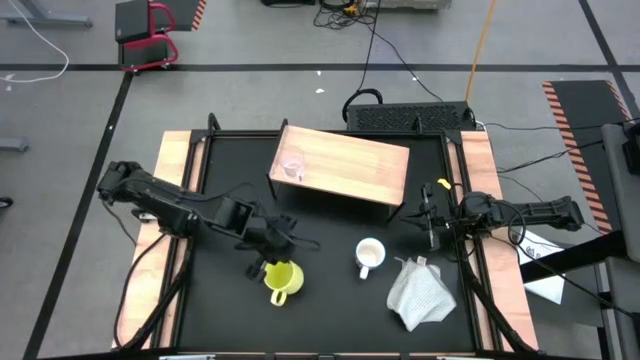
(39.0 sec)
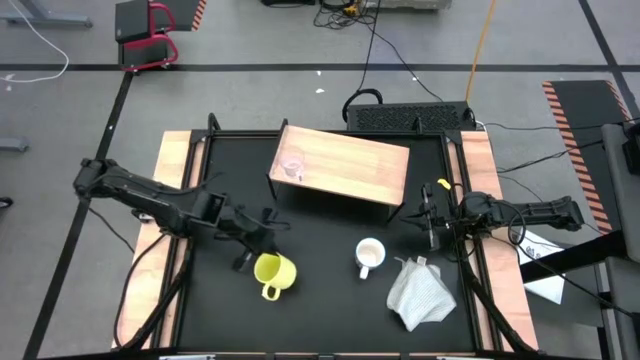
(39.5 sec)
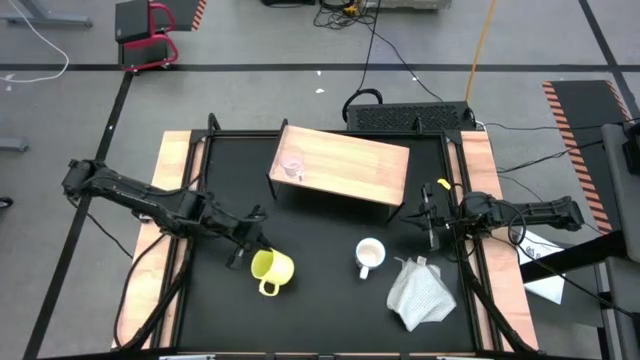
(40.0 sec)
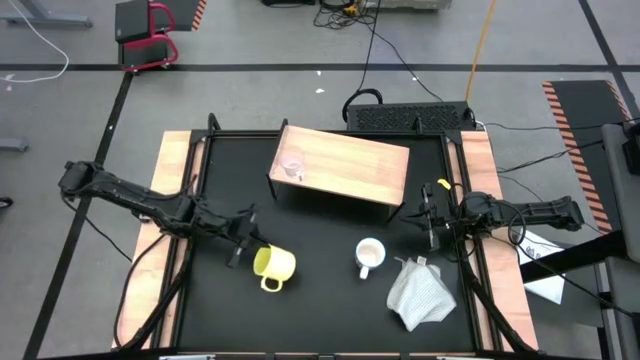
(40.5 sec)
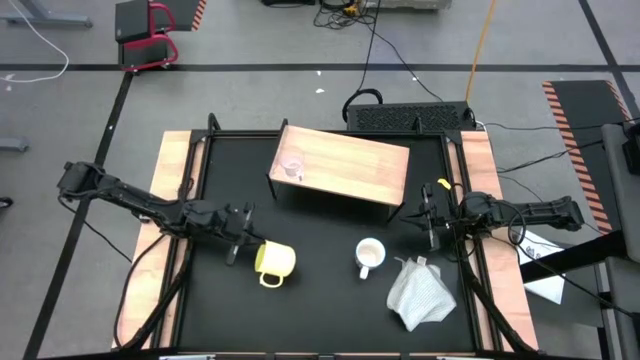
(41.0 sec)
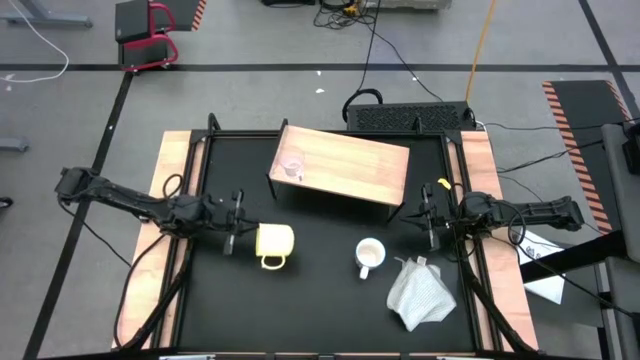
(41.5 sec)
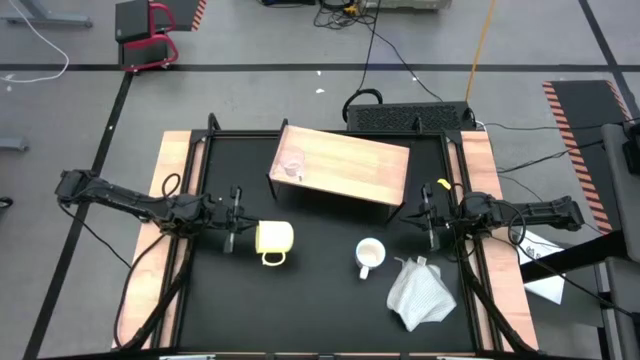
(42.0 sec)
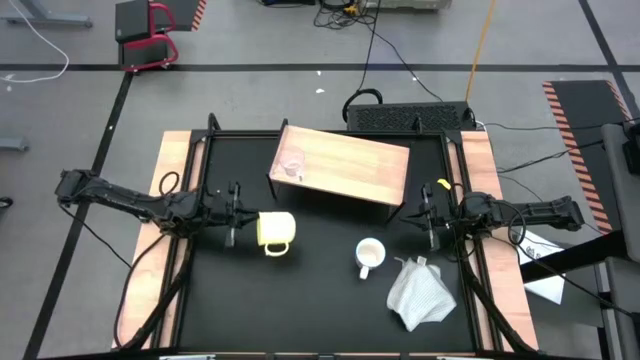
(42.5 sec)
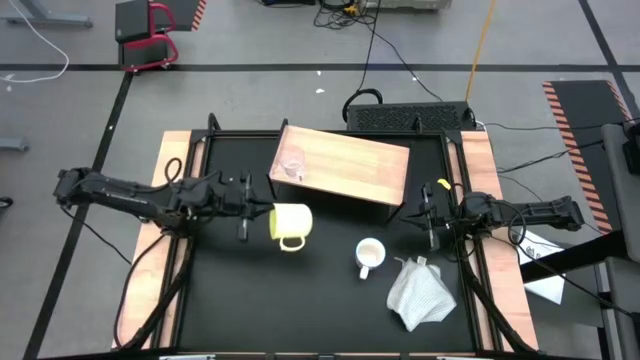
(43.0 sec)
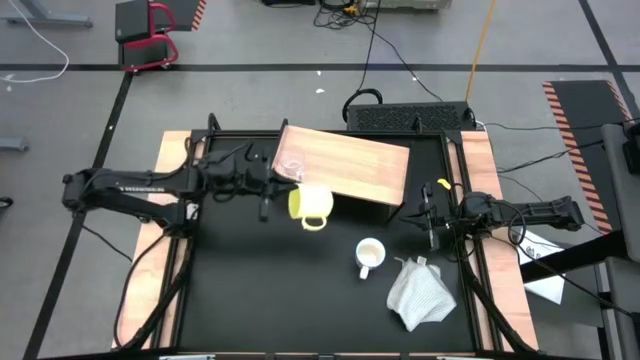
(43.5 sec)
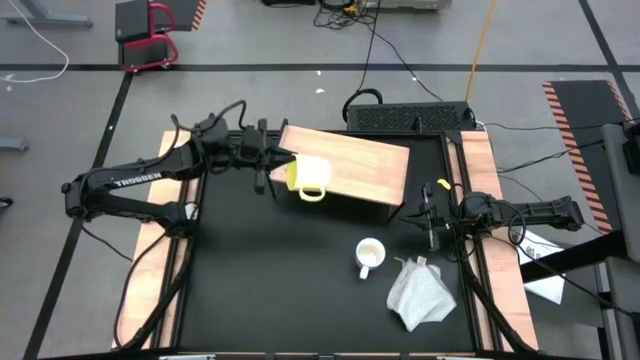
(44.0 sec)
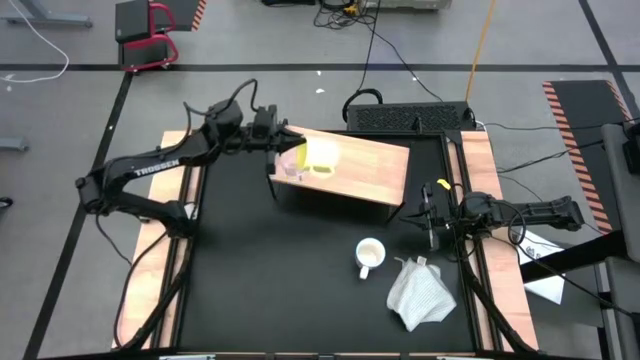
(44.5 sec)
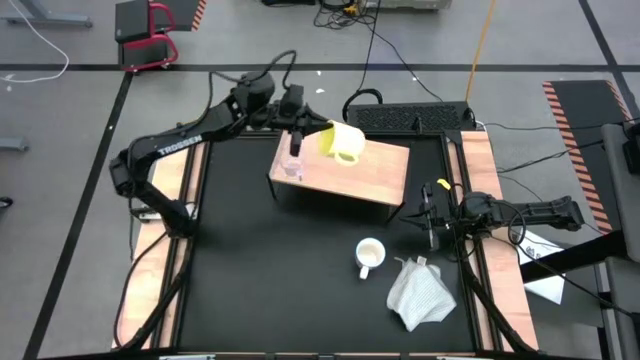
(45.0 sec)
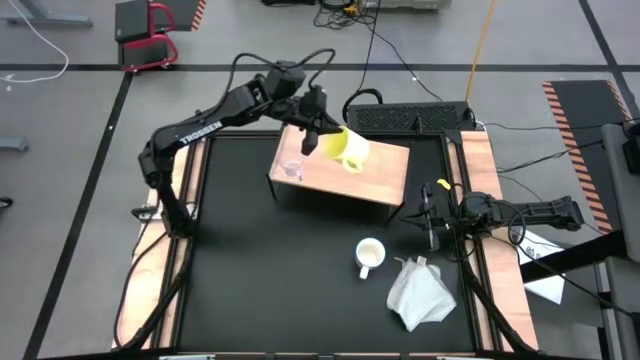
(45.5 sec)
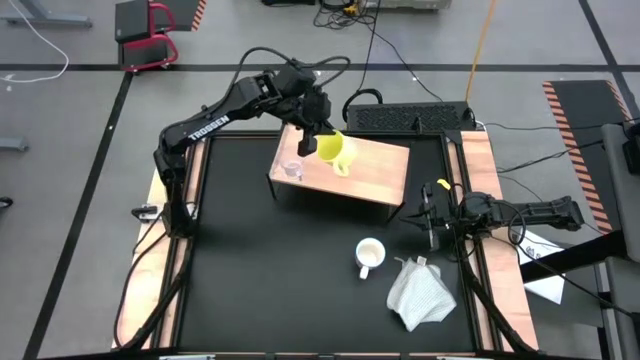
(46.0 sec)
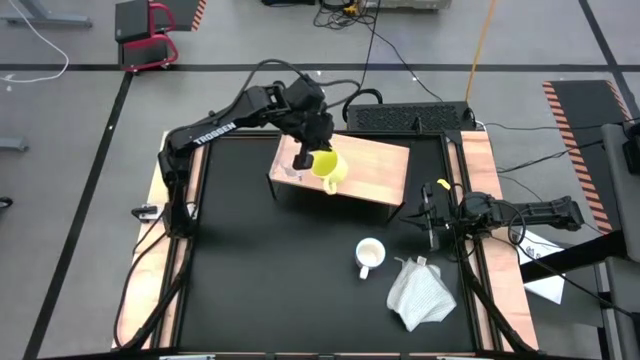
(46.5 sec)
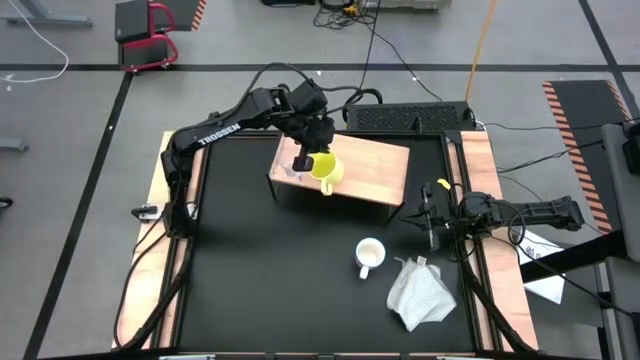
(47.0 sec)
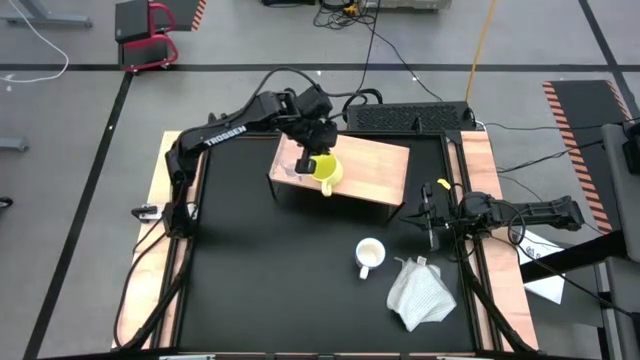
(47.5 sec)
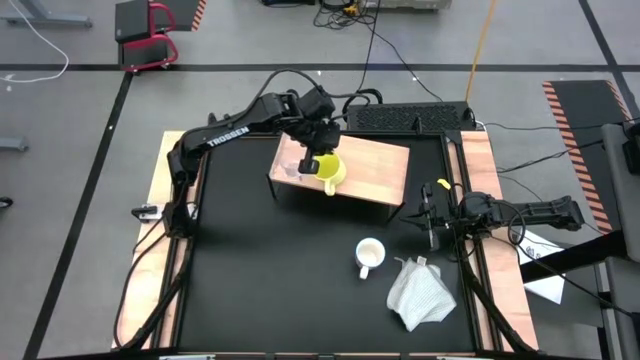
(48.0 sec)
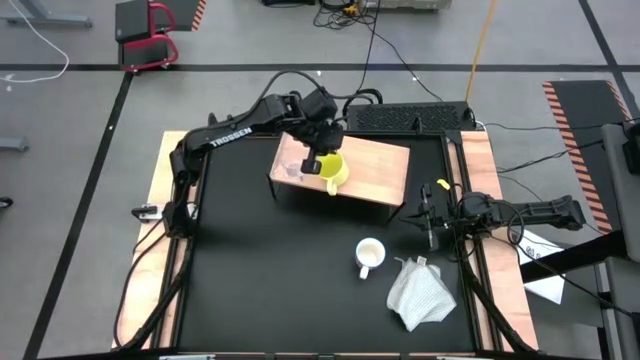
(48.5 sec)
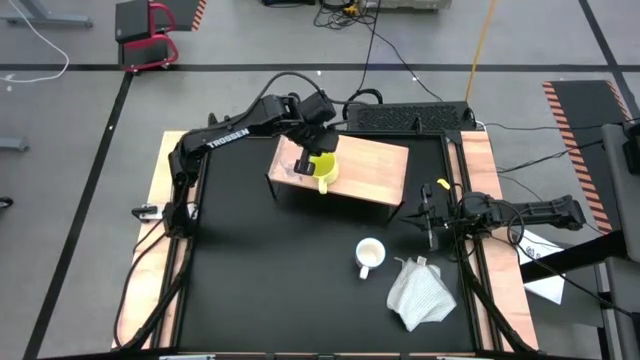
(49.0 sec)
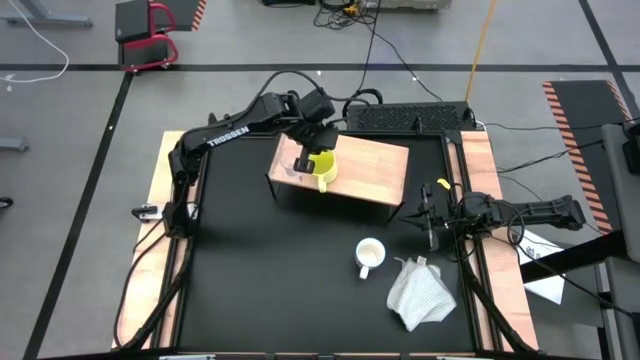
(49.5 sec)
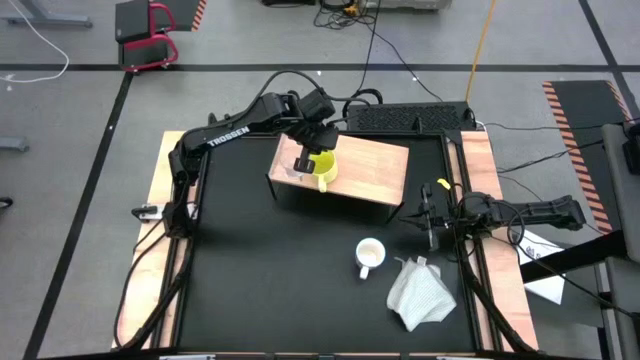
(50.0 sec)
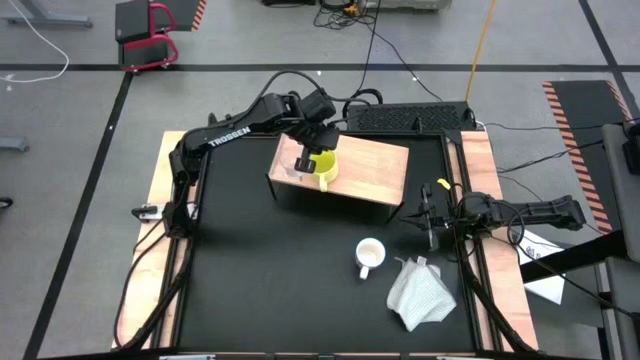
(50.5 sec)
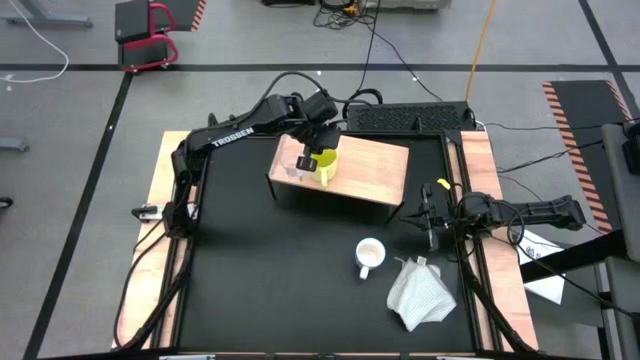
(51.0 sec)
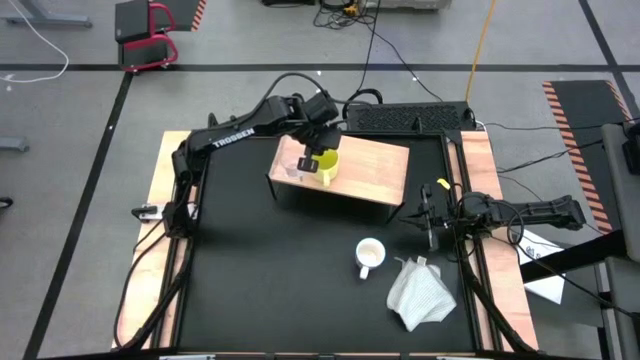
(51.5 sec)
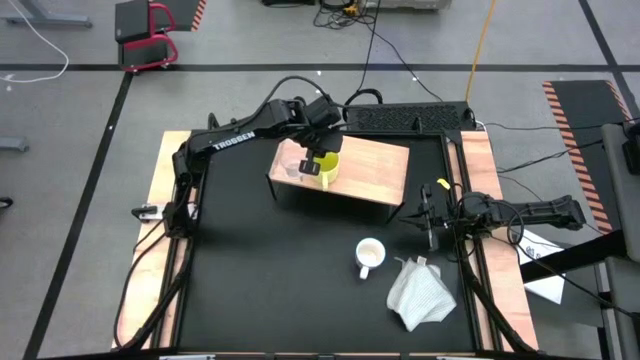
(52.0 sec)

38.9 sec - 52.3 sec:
Task: Stack small to large cups/mugs on shelf
Put the light green mug on the shelf

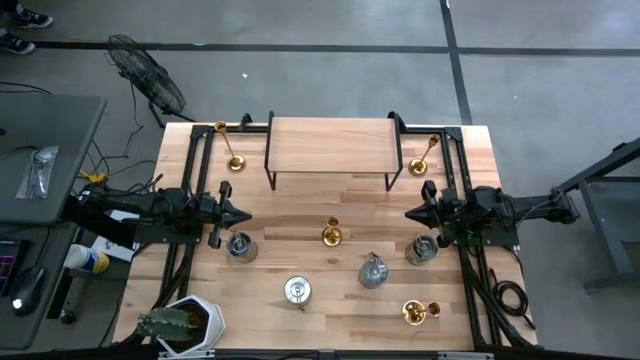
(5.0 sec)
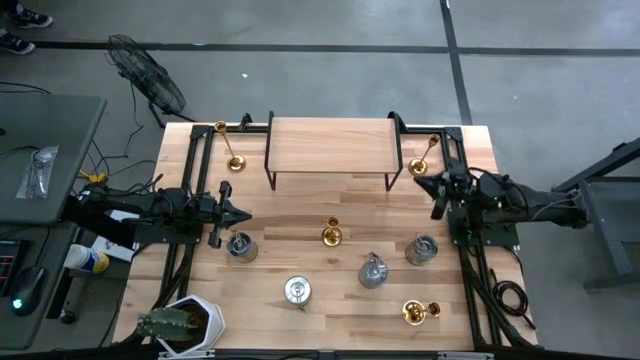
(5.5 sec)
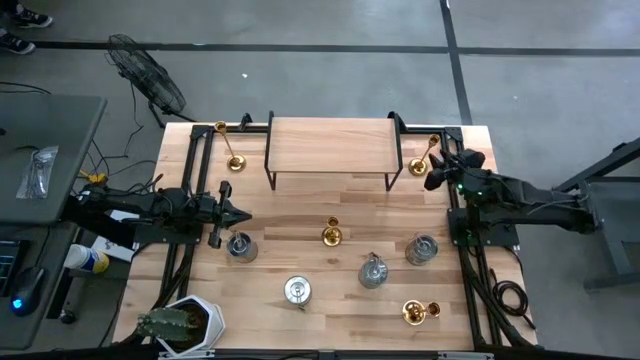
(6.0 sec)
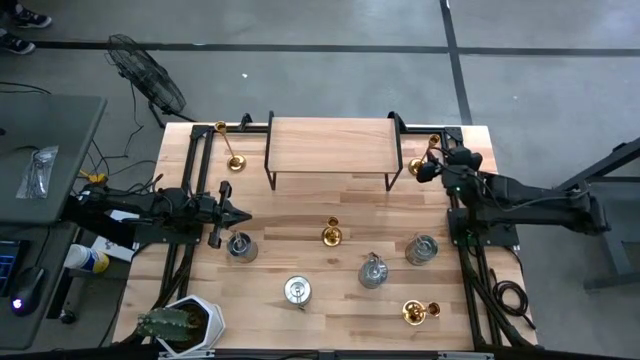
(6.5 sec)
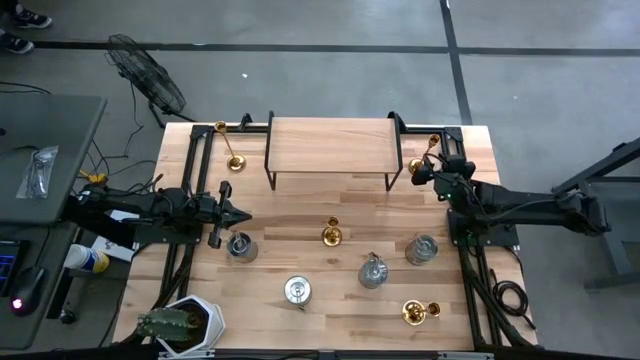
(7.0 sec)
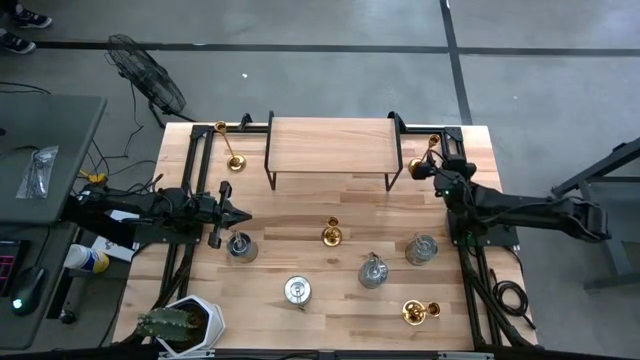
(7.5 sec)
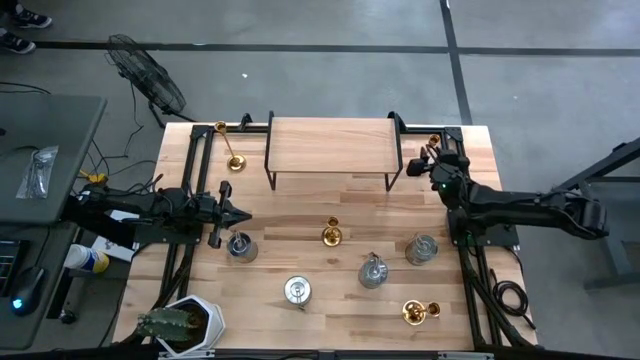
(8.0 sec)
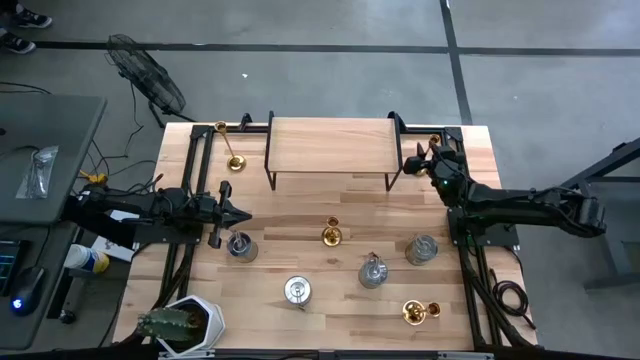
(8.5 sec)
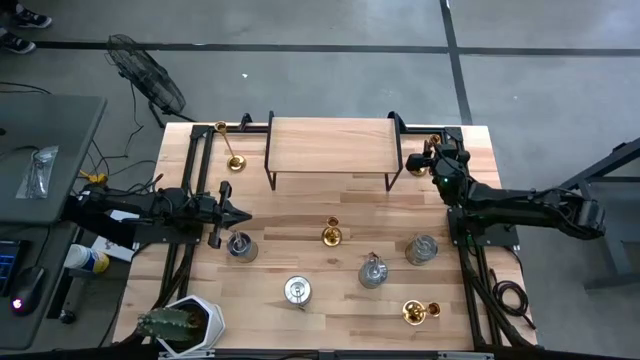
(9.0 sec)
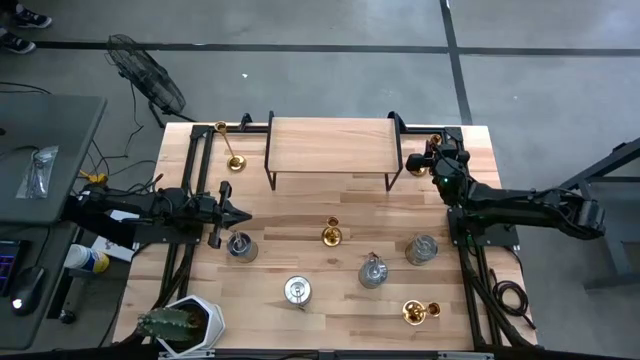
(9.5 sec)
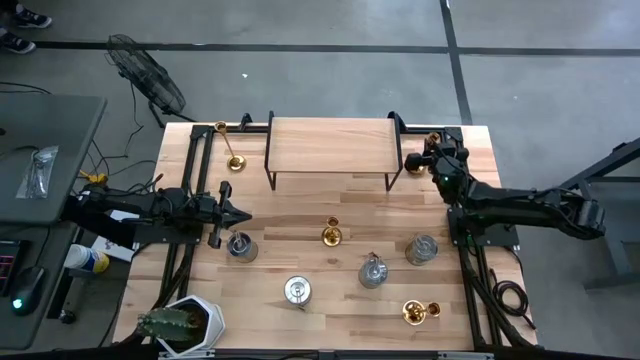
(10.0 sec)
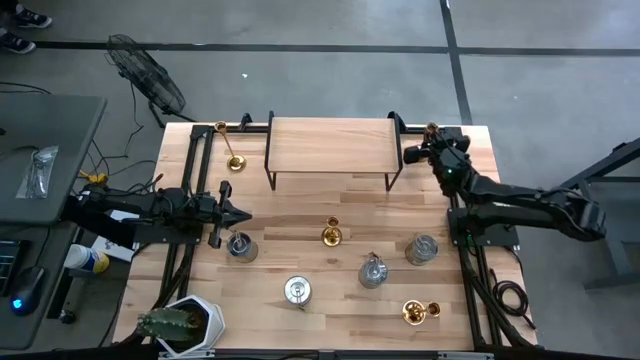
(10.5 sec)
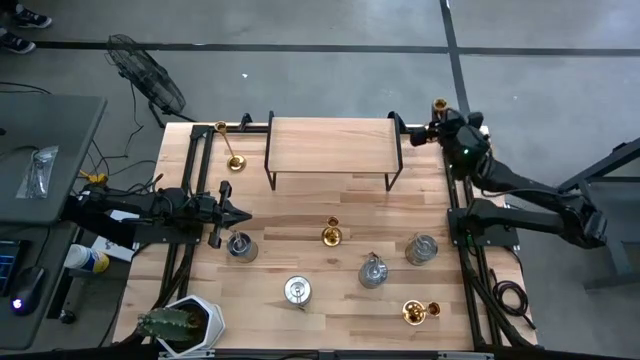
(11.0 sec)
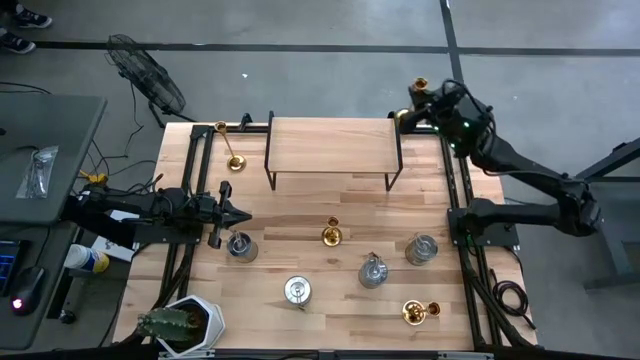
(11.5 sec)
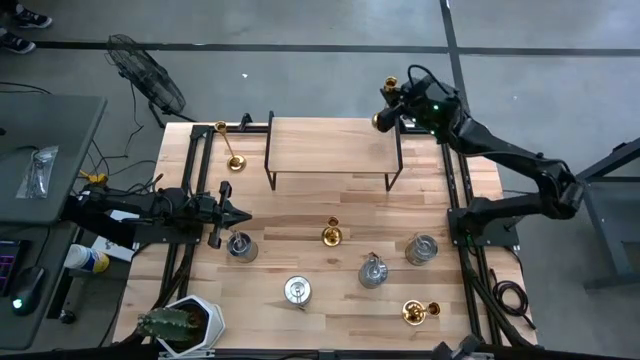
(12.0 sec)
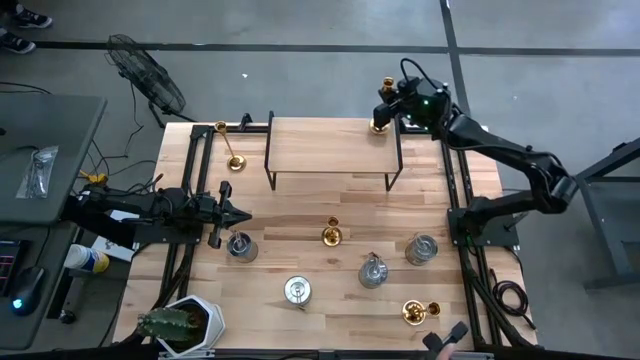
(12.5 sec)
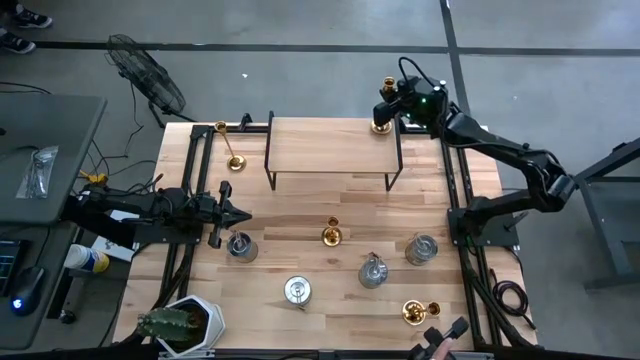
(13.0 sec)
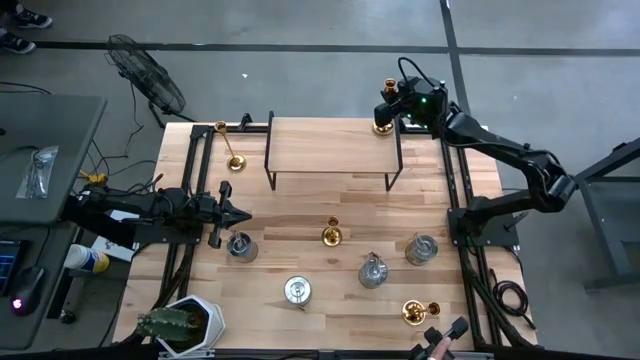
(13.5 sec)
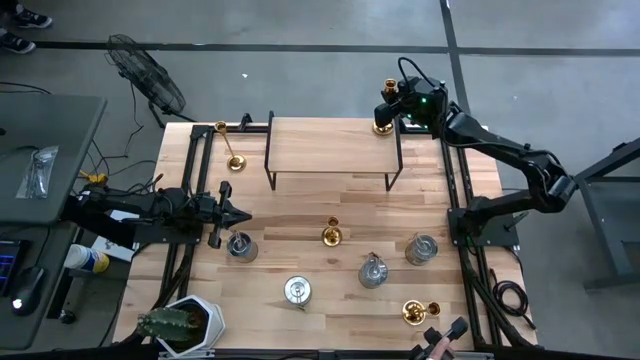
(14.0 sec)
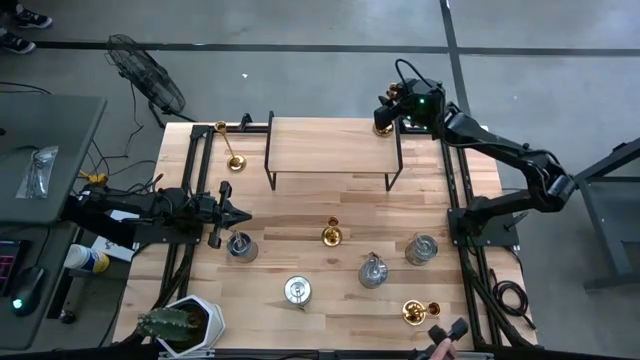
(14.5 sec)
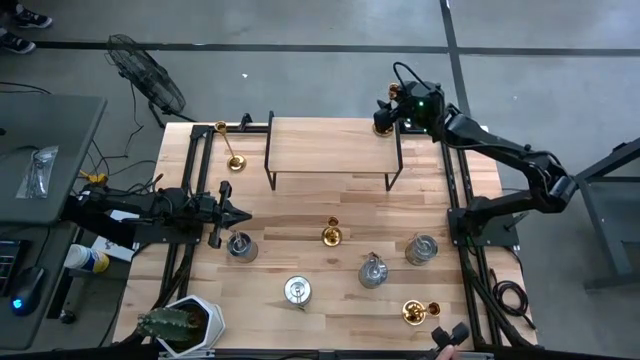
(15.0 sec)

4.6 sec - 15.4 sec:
Task: Pick & Place candle stick holders
Put the gold candle holder on the shelf
